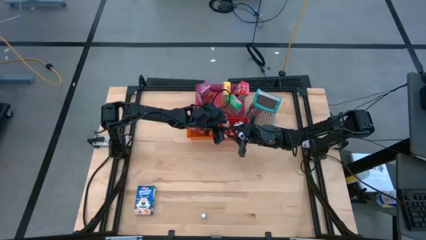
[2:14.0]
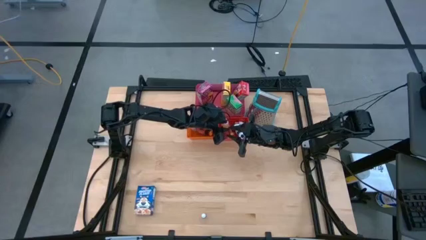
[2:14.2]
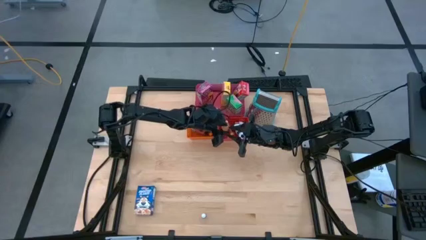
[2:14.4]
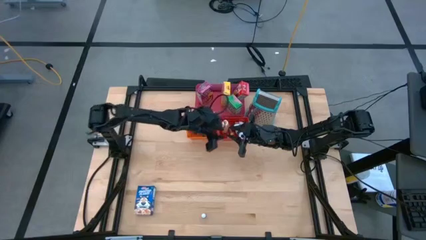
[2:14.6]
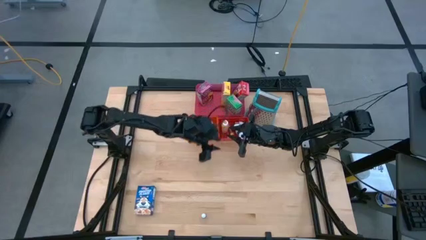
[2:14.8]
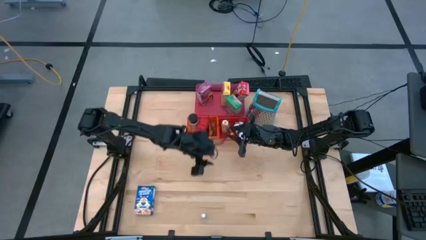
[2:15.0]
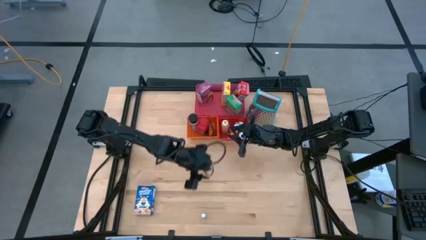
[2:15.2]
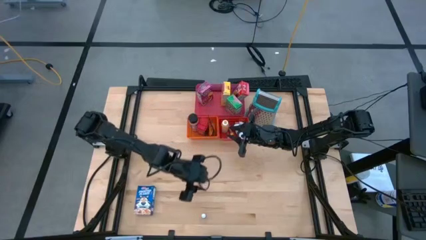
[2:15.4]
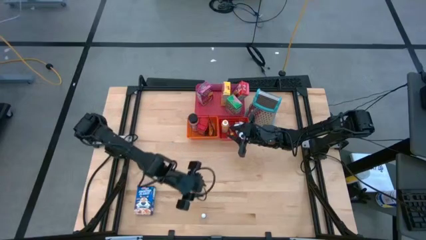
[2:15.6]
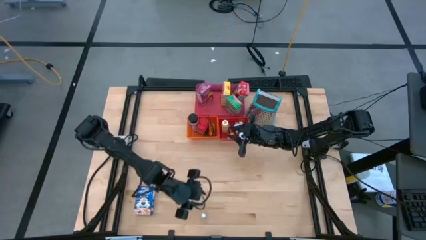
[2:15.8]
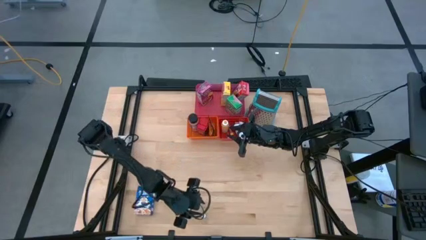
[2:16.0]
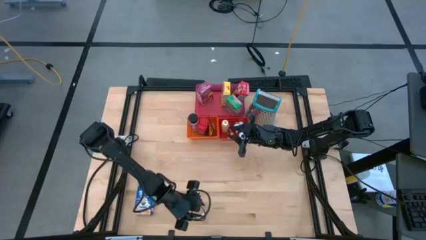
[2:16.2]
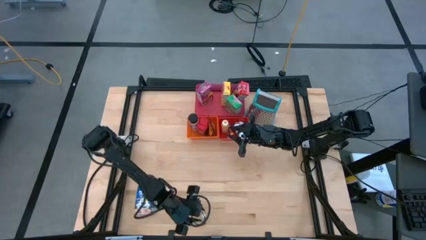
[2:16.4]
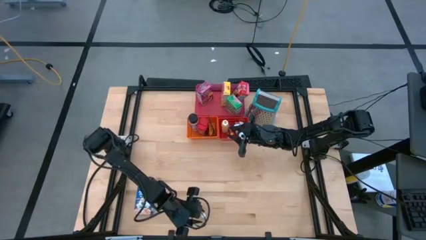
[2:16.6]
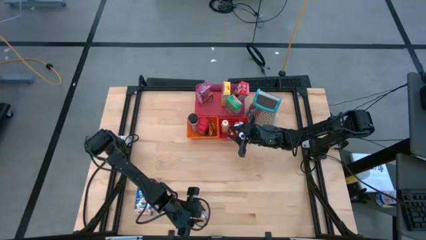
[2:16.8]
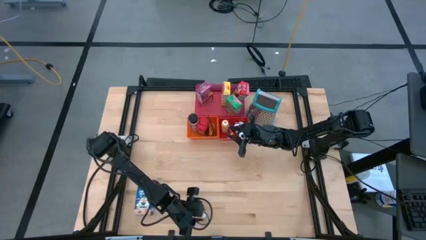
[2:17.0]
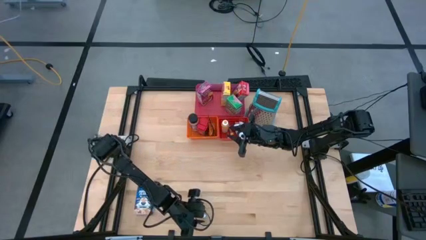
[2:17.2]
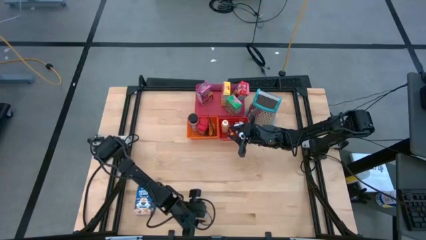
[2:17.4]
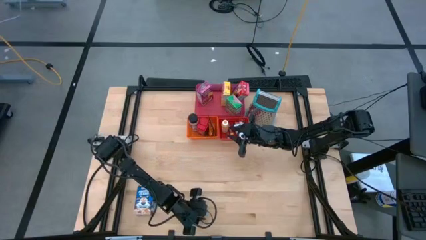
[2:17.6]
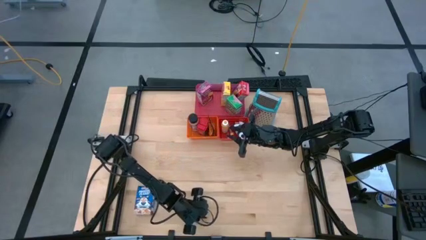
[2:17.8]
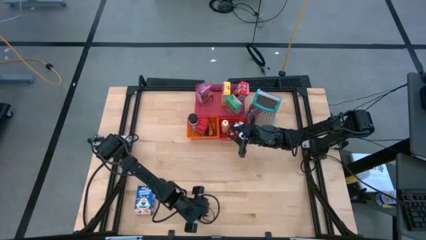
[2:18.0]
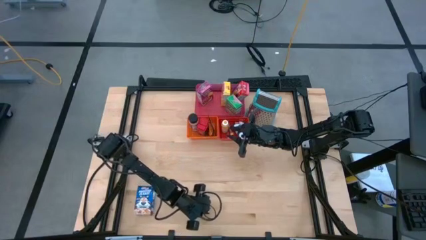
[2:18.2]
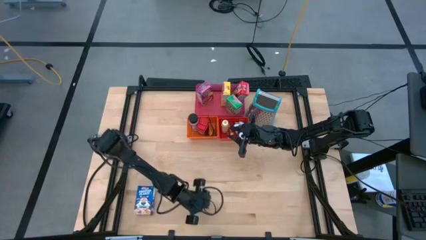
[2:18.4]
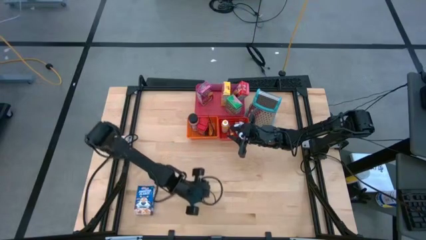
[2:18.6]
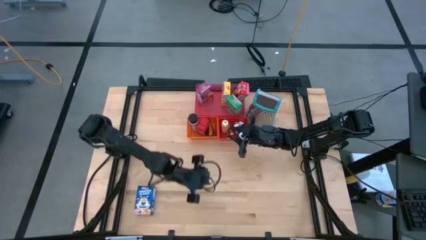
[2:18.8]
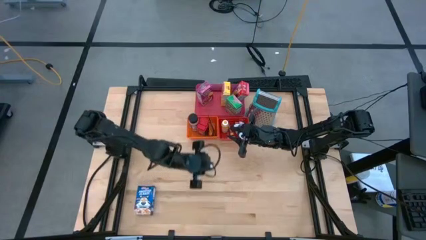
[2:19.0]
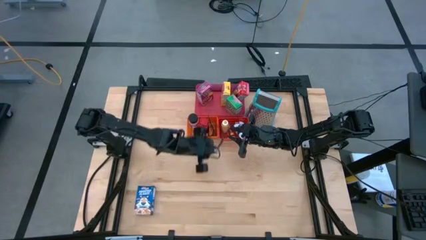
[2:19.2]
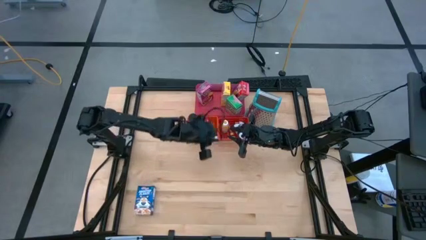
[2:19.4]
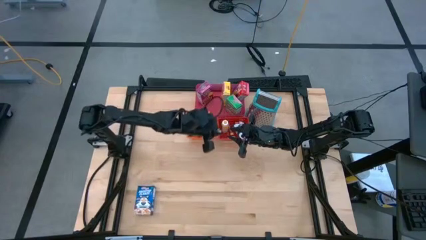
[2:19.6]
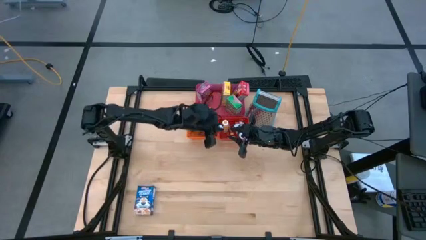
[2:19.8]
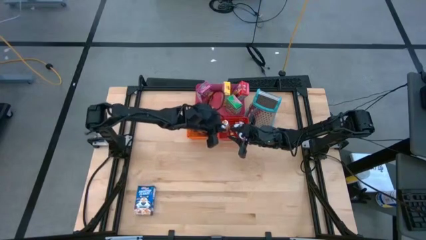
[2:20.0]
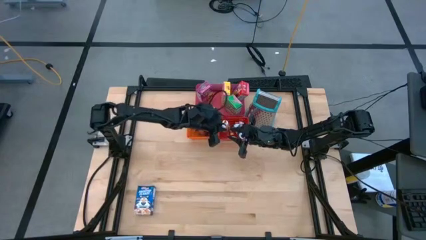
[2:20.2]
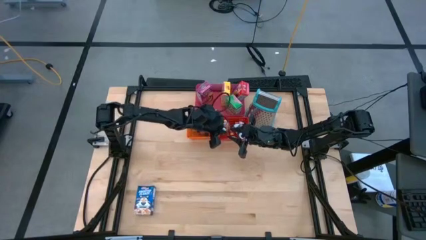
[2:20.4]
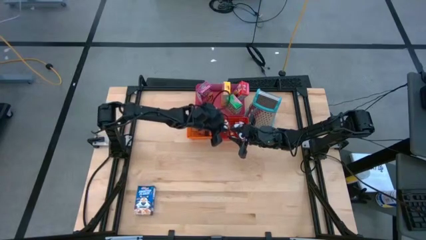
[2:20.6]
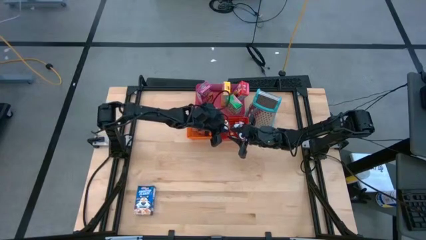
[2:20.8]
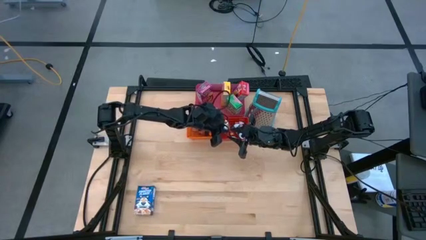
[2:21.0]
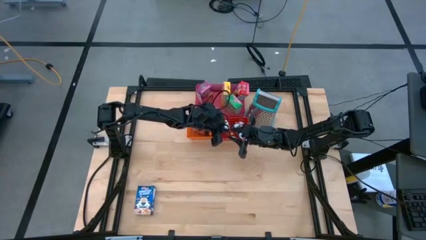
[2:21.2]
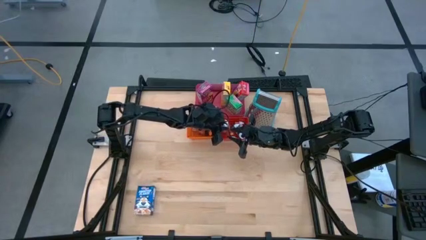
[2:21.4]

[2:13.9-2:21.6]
Task: Pick & Place Kitchen Items
Put the blue food coloring bottle into the red bin

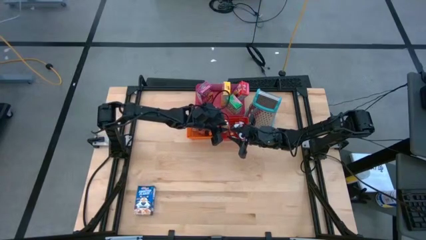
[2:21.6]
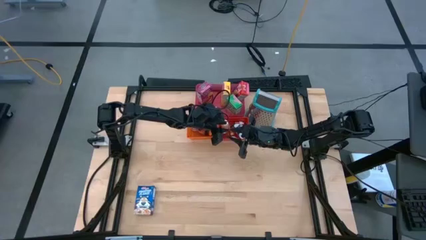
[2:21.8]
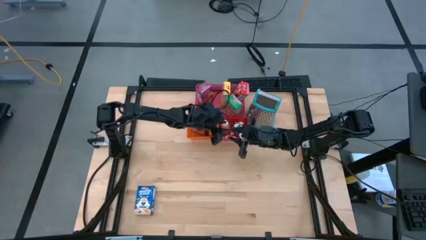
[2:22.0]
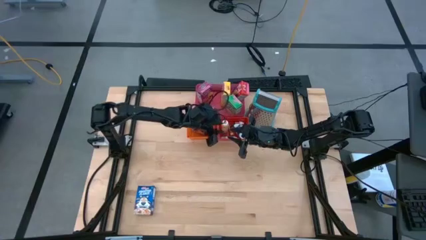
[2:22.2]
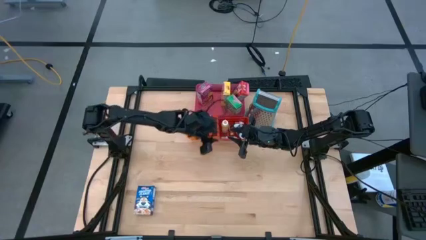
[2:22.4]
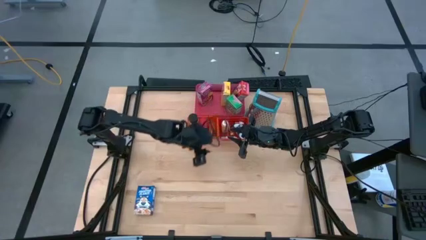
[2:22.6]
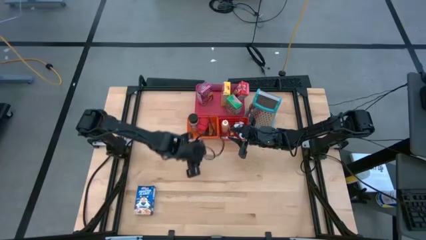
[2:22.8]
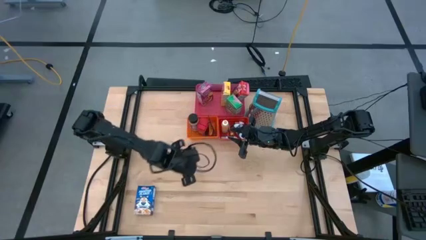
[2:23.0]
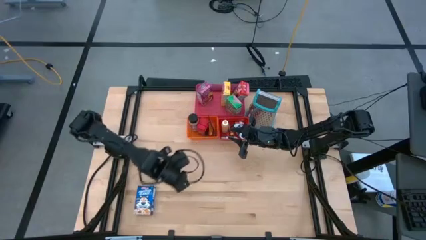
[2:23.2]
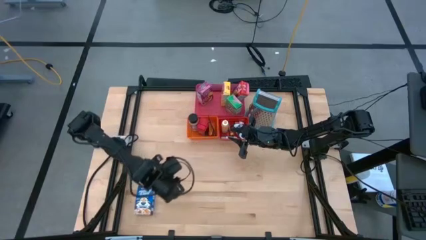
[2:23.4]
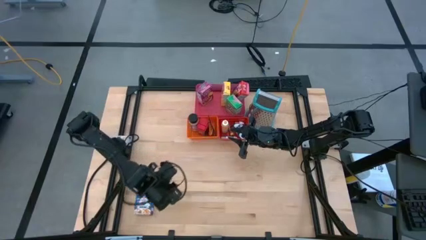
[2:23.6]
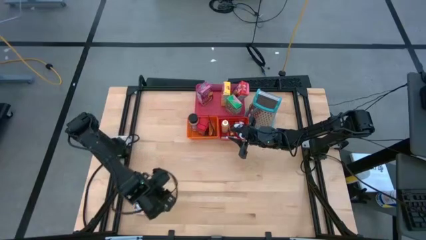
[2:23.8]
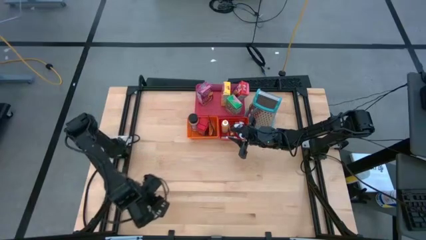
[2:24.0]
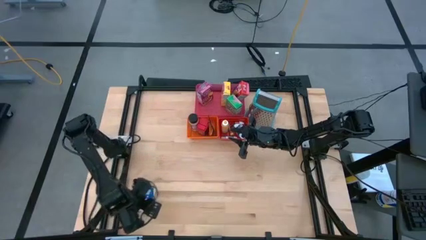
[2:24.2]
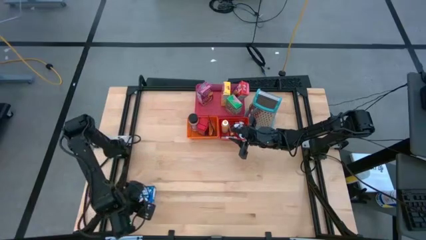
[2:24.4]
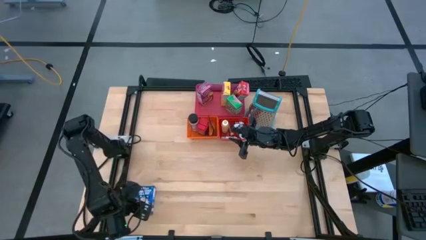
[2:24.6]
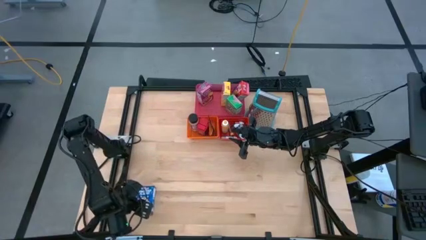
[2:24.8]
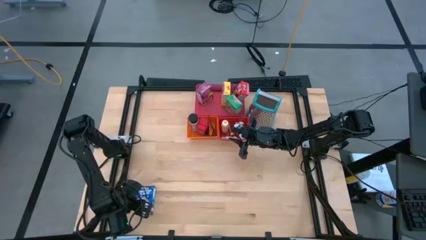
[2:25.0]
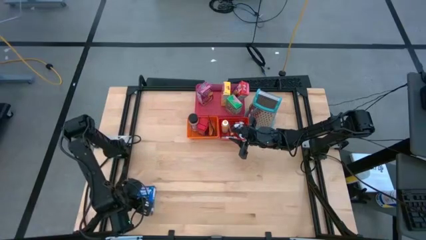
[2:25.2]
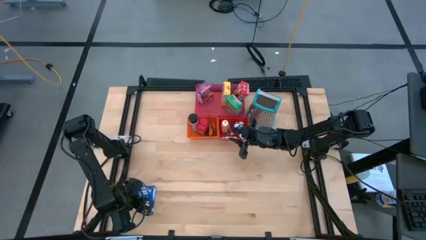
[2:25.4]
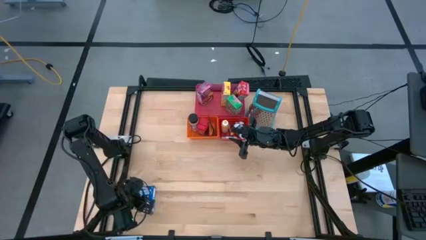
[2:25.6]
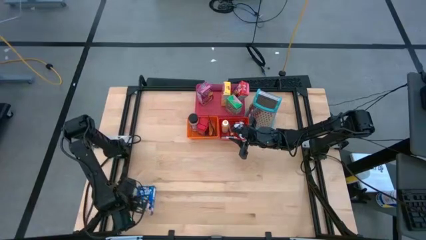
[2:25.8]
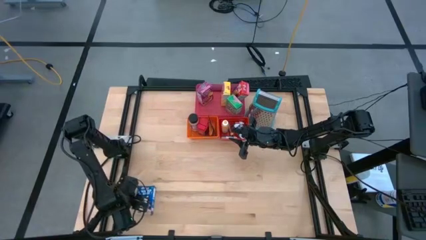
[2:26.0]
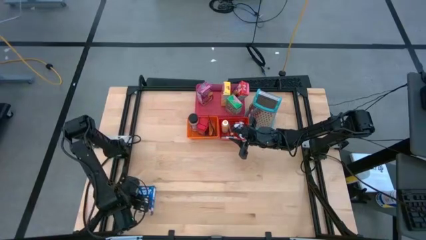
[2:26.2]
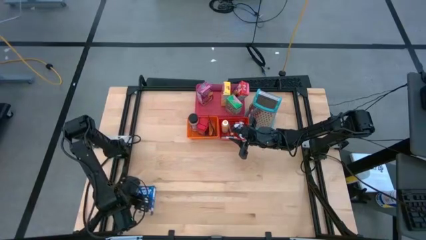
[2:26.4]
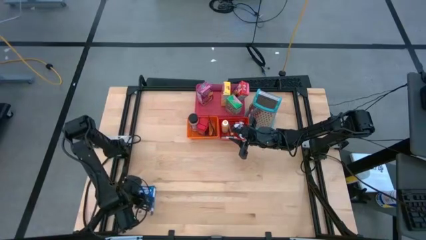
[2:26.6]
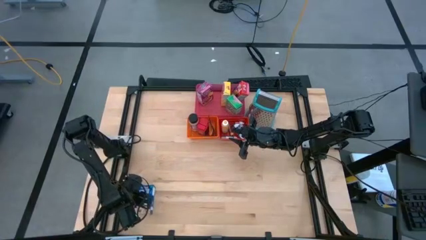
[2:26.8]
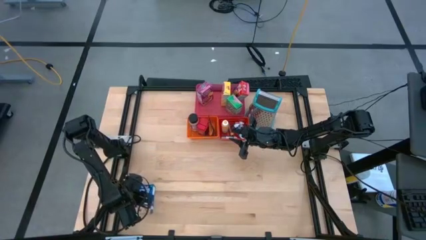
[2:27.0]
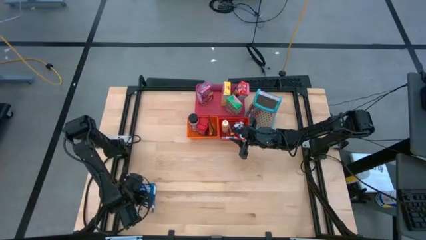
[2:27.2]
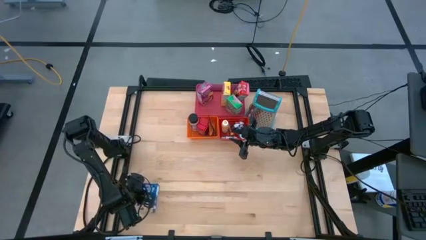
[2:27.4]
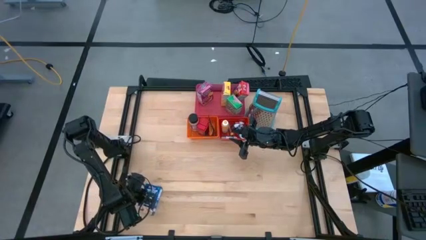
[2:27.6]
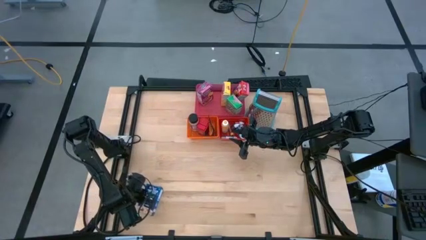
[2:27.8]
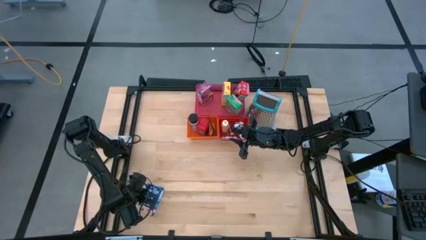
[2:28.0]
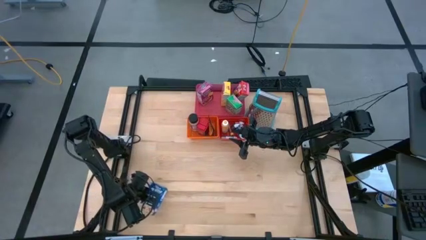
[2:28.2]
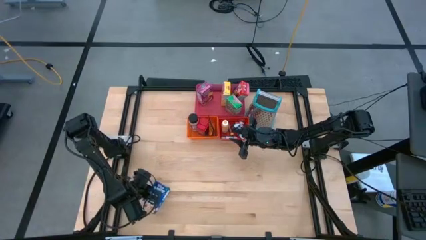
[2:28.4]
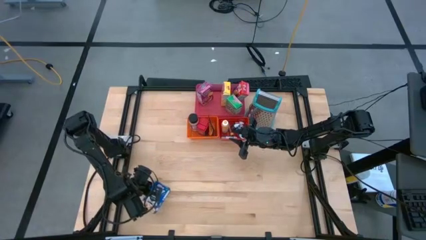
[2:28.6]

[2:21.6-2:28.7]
Put the blue cereal box into the pink bin
